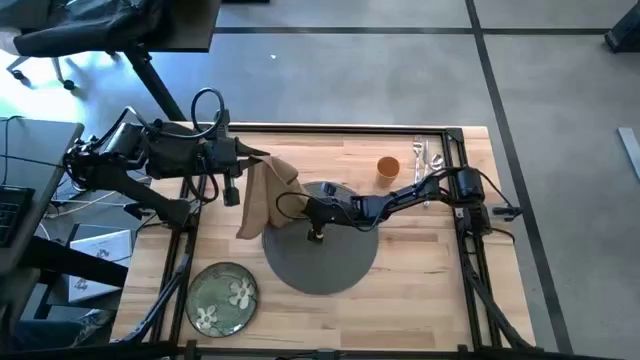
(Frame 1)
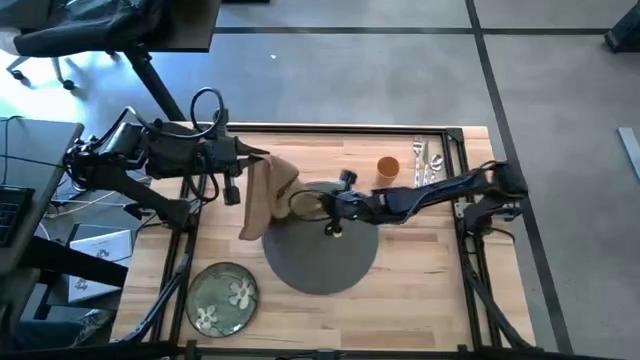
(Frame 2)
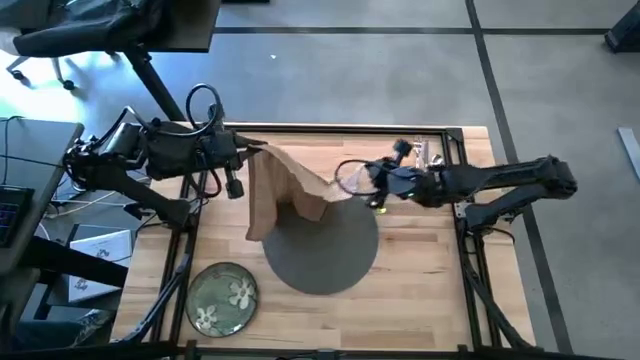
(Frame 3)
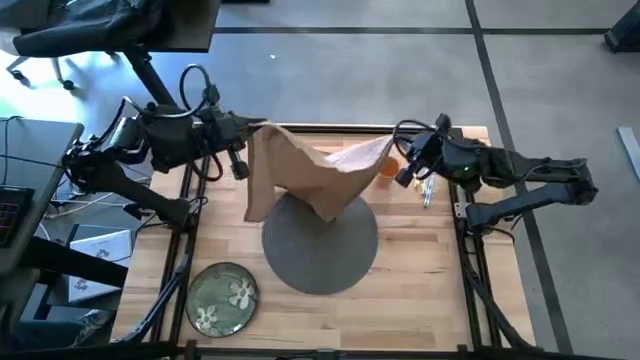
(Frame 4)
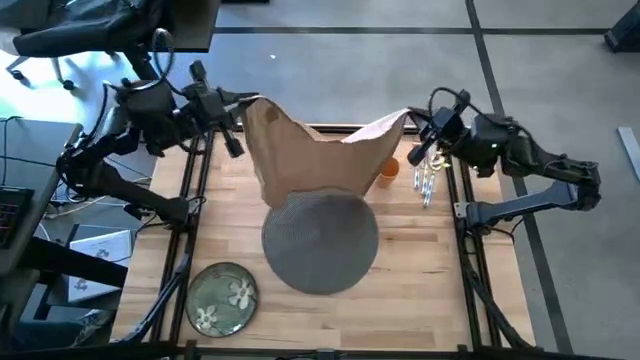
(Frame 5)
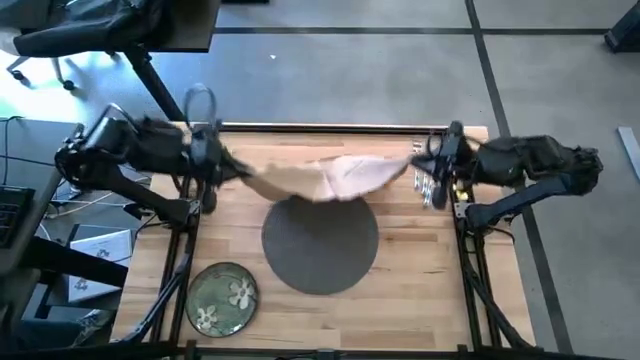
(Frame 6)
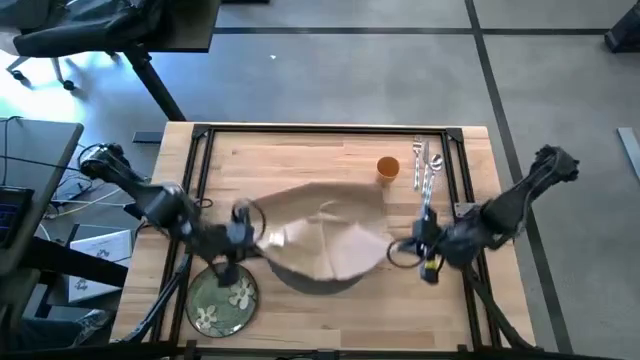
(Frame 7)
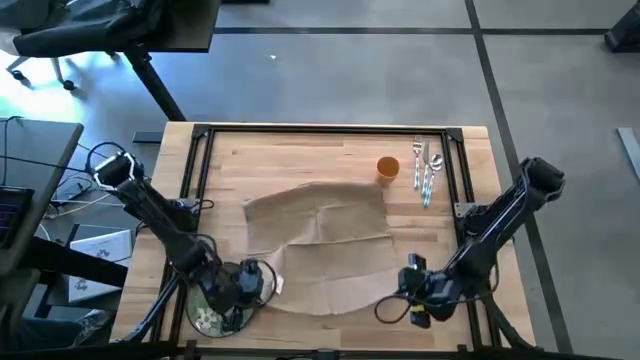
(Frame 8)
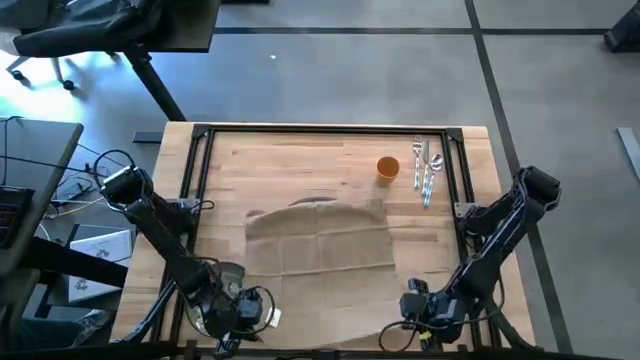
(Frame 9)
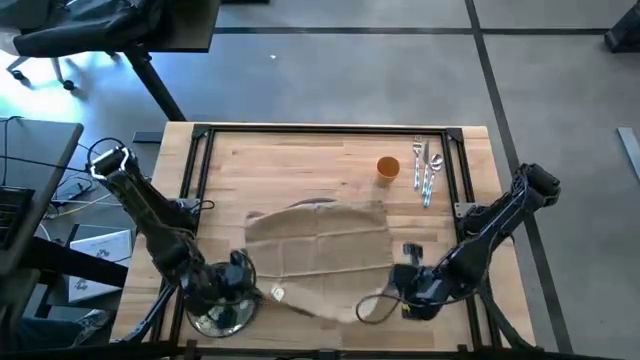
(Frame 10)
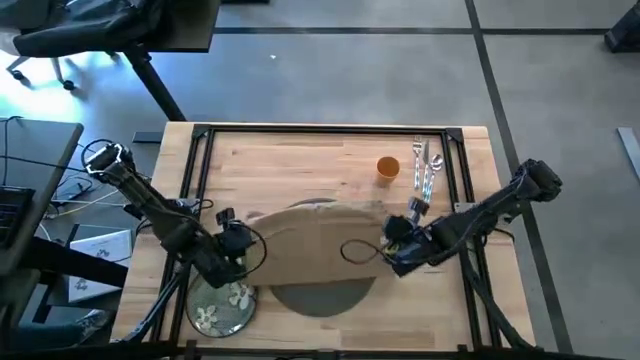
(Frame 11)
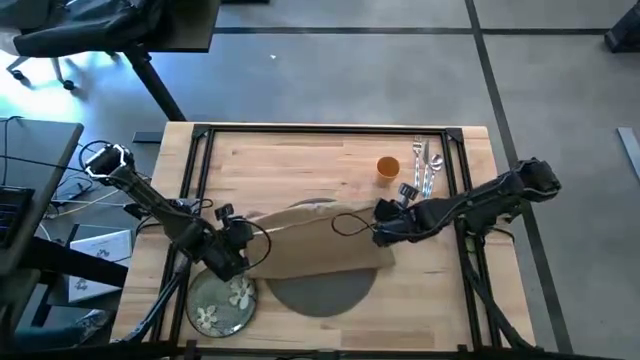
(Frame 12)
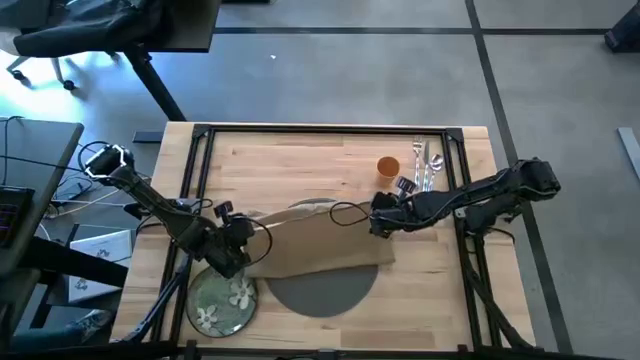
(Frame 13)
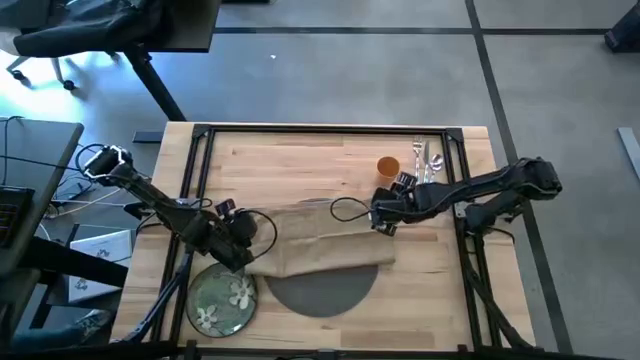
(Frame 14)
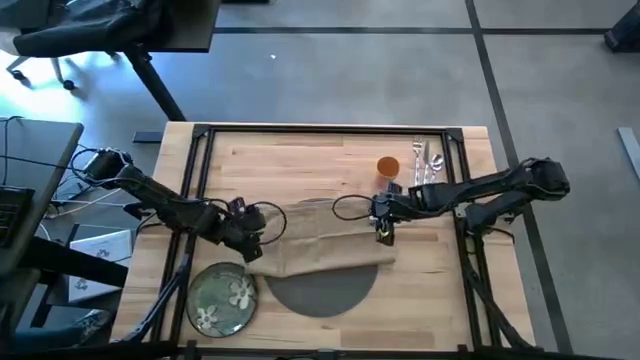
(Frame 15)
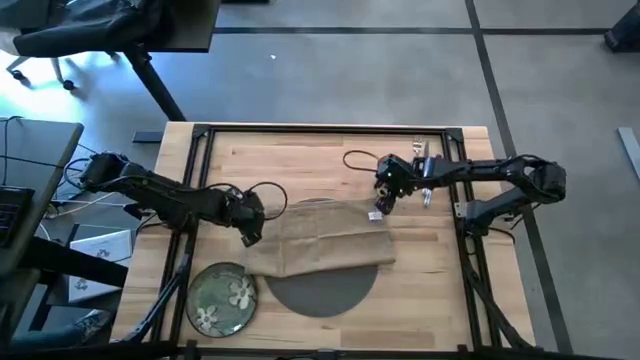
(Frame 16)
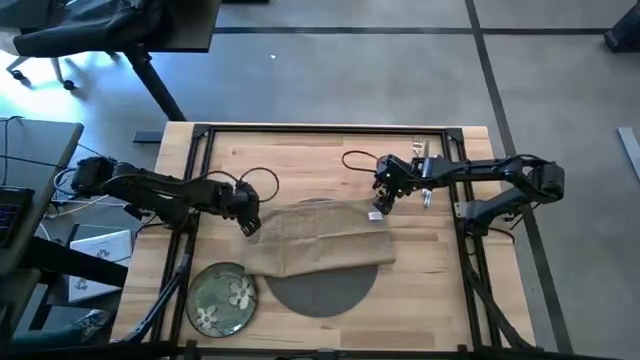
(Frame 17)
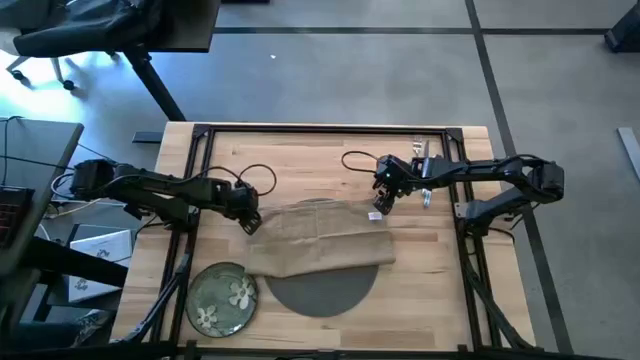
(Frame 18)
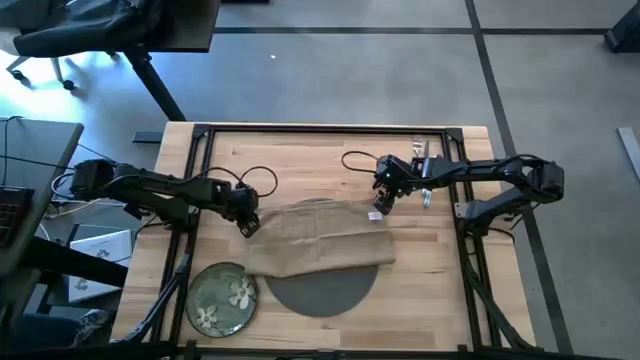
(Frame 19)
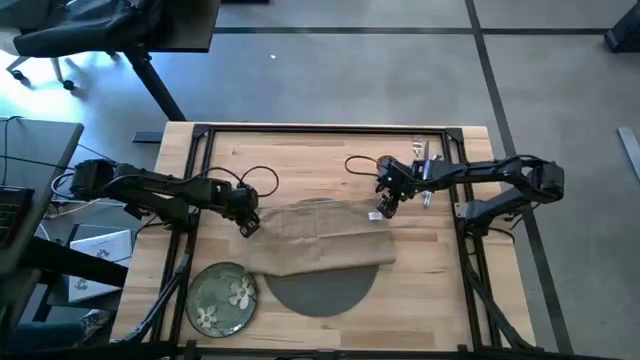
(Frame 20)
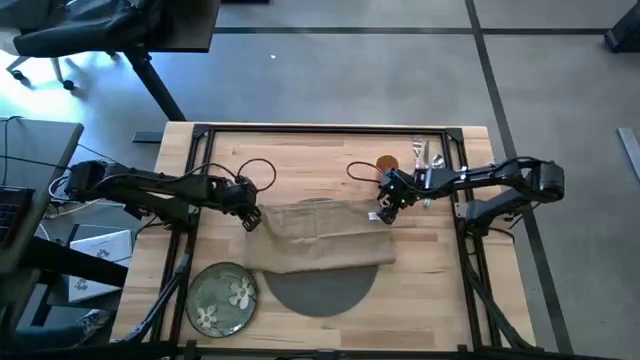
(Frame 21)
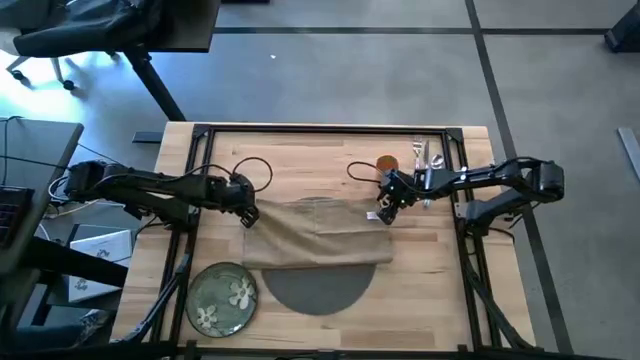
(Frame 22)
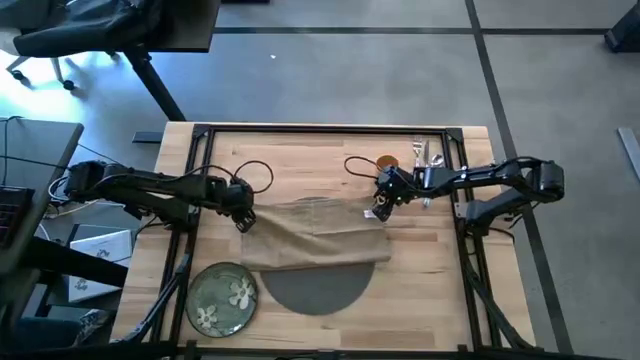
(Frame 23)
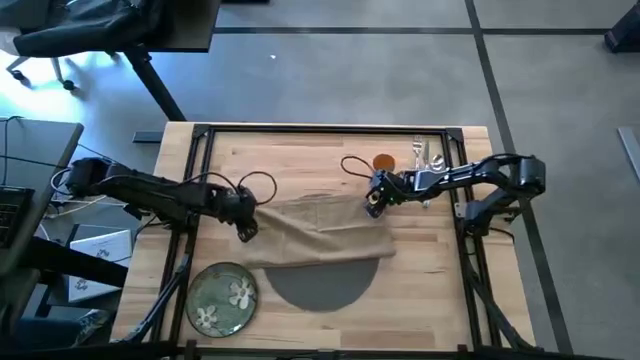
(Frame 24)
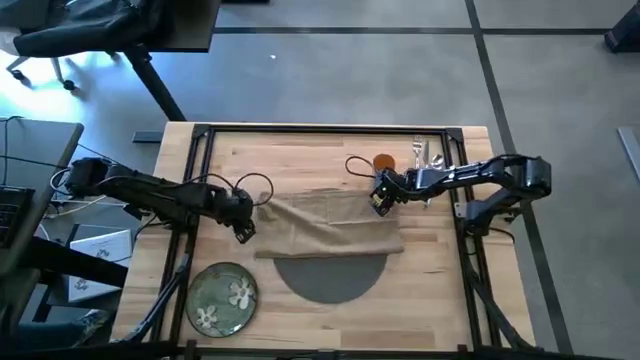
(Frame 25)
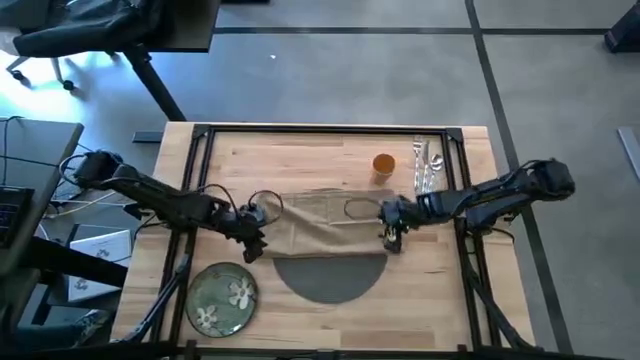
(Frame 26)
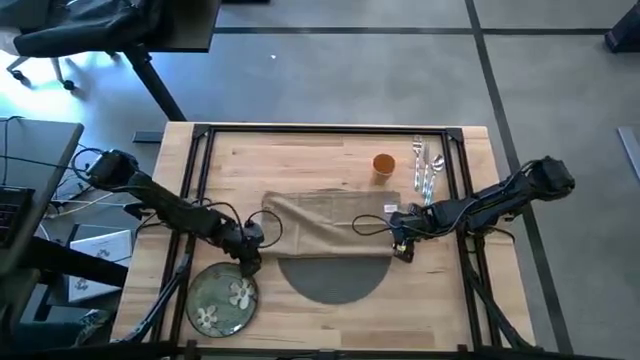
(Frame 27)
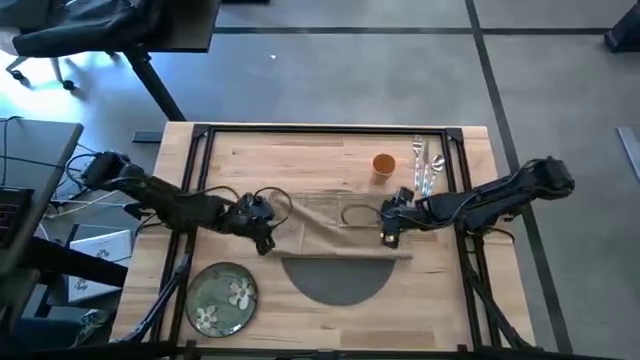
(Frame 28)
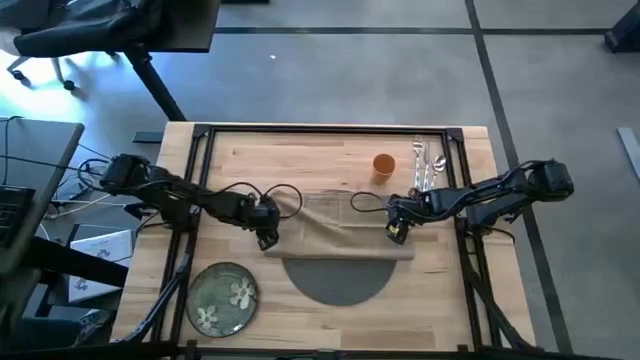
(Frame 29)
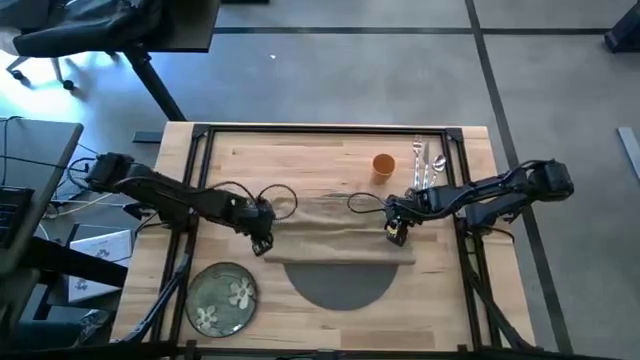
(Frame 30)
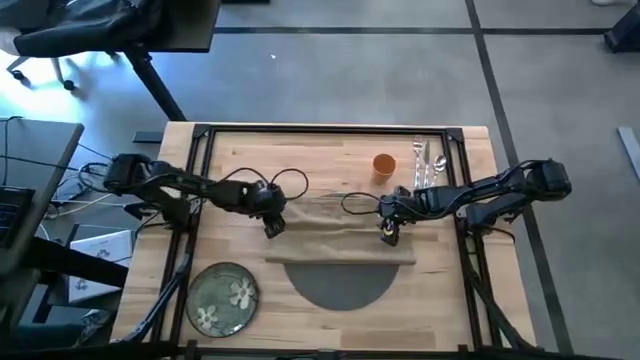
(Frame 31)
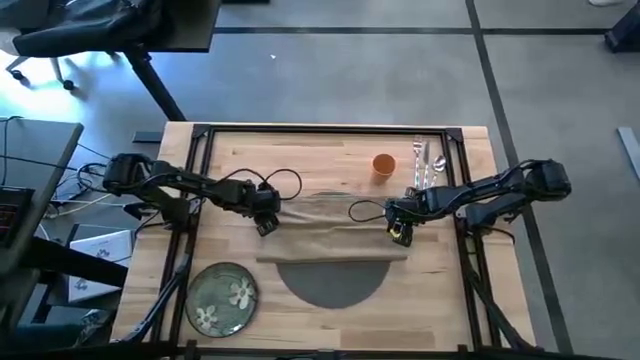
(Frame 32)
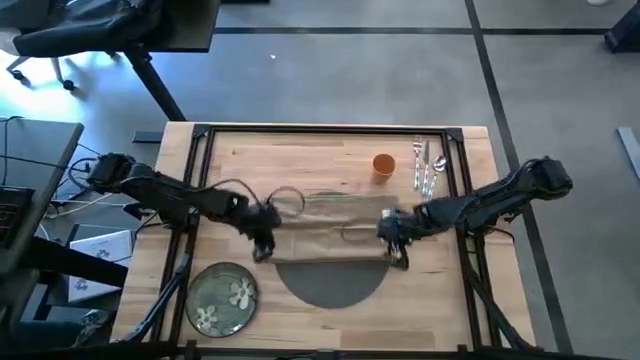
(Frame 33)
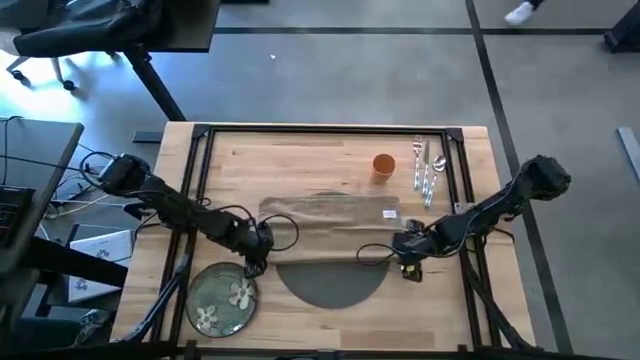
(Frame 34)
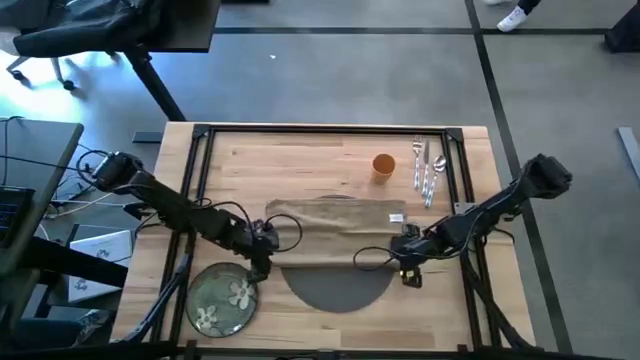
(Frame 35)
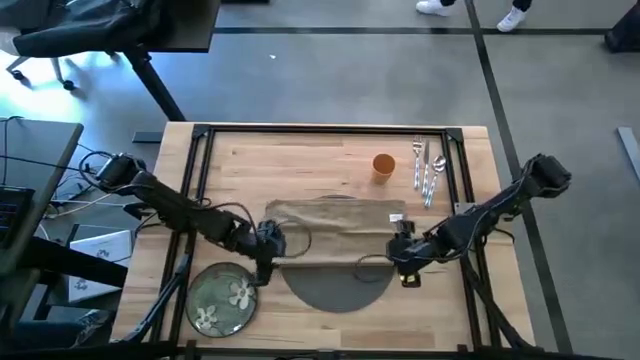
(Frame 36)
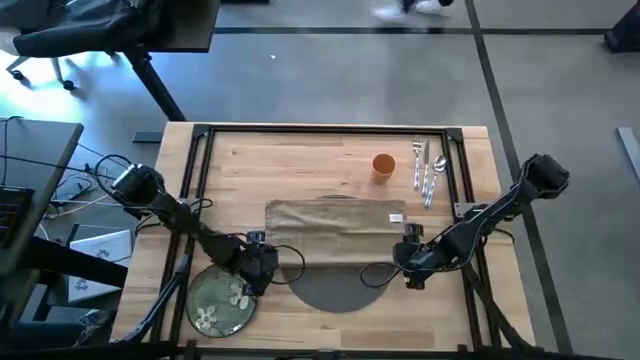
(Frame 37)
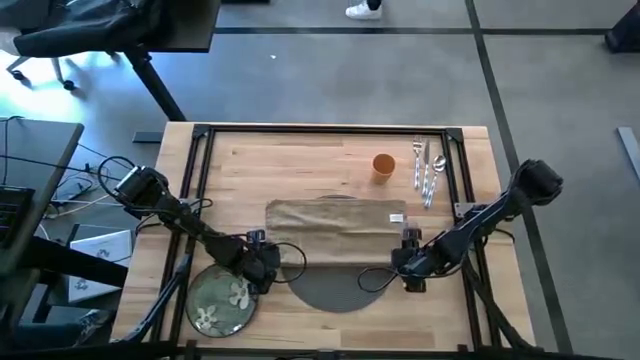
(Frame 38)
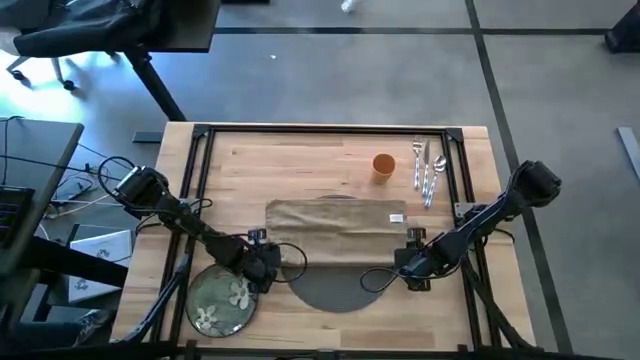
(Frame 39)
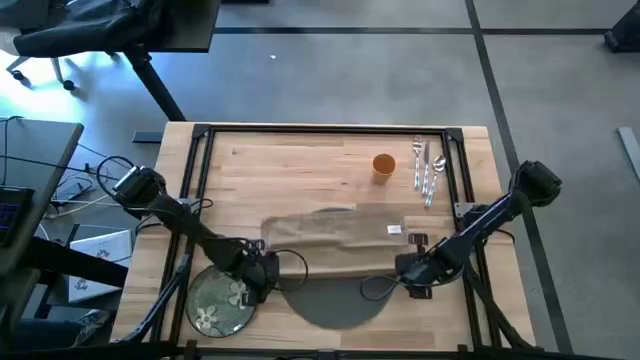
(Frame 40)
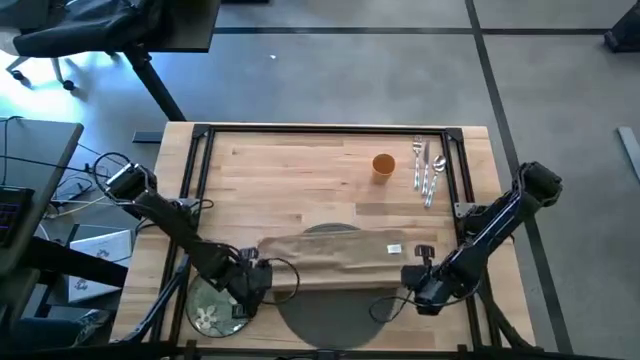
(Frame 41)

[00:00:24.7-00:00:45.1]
Task: Set table place
Fold the brown napkin
